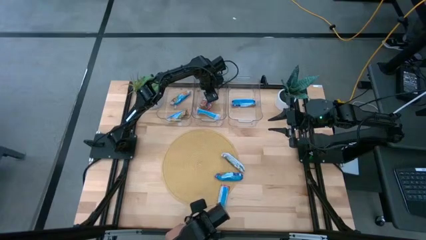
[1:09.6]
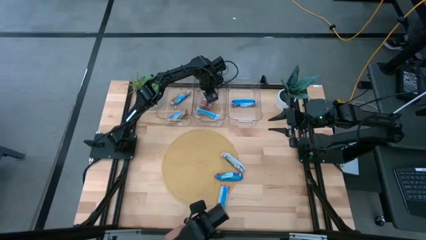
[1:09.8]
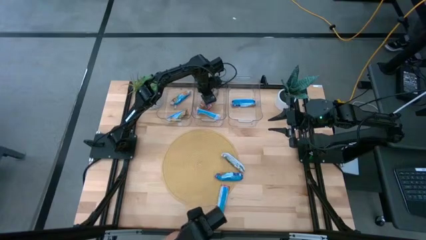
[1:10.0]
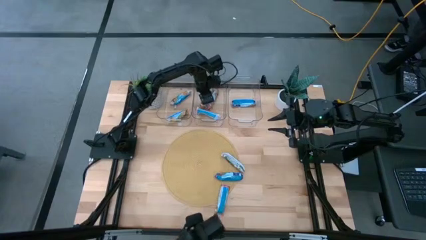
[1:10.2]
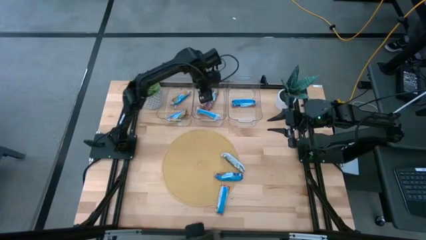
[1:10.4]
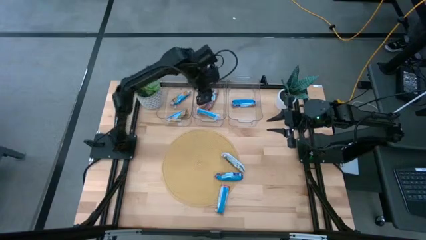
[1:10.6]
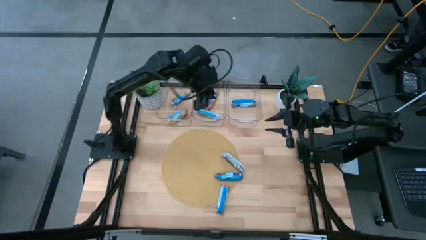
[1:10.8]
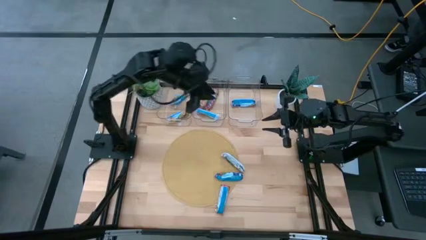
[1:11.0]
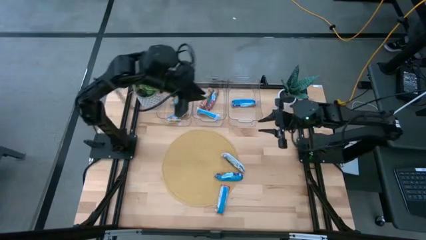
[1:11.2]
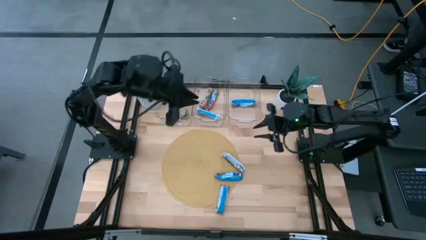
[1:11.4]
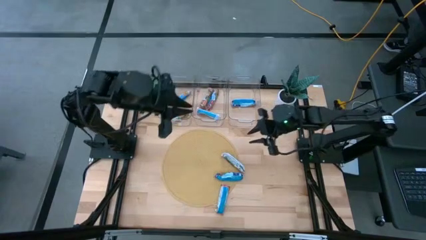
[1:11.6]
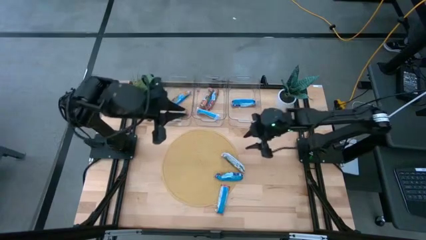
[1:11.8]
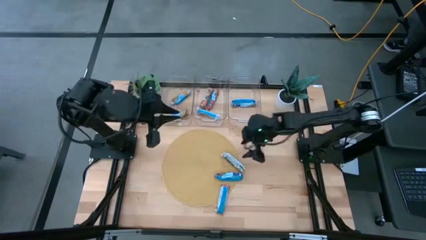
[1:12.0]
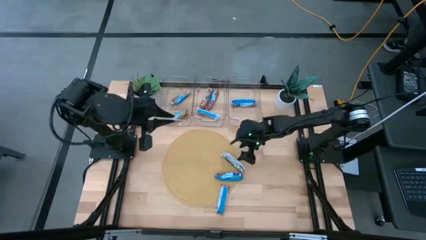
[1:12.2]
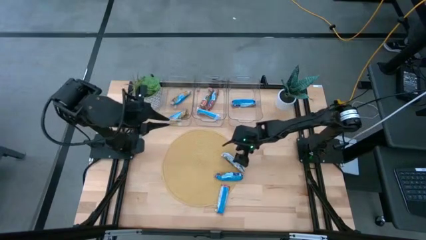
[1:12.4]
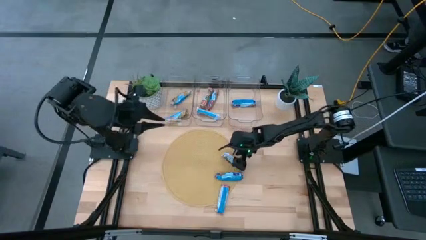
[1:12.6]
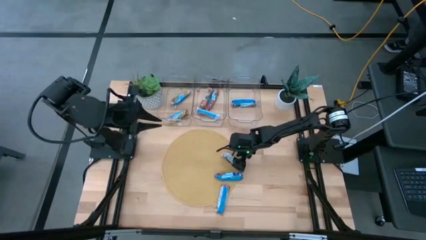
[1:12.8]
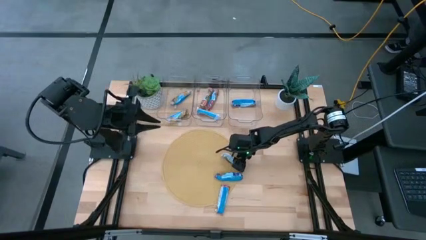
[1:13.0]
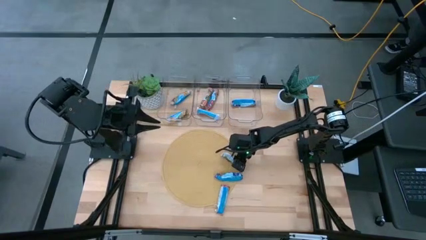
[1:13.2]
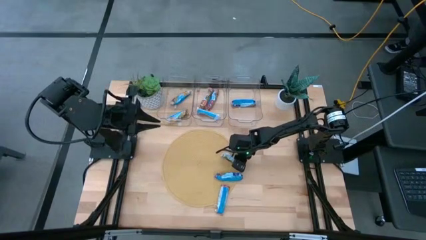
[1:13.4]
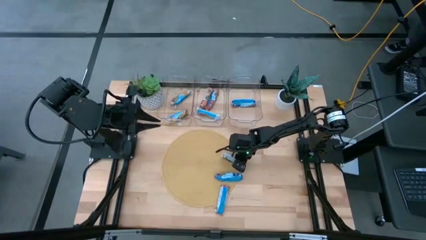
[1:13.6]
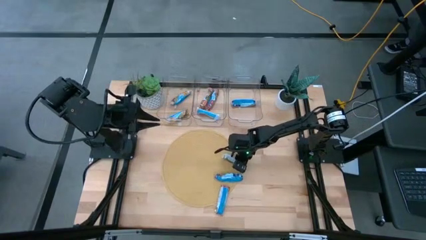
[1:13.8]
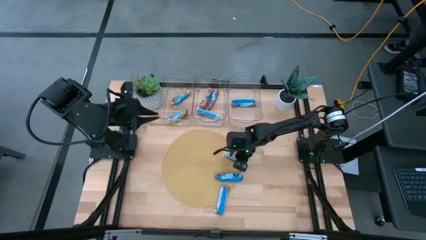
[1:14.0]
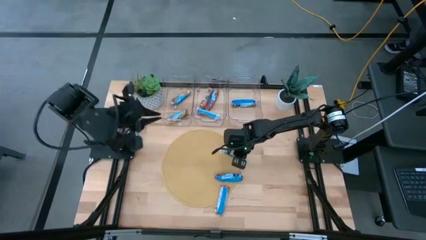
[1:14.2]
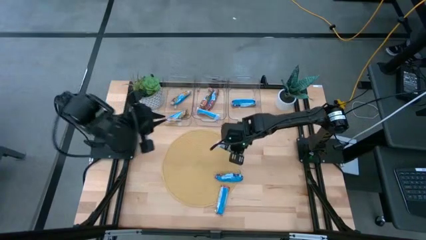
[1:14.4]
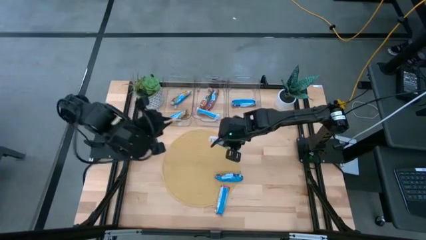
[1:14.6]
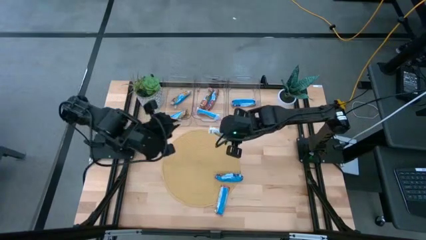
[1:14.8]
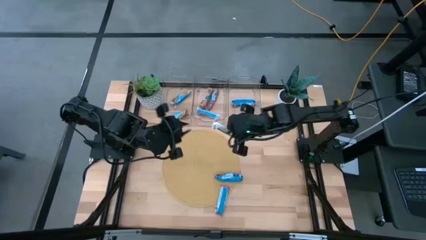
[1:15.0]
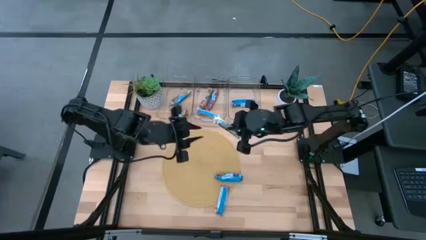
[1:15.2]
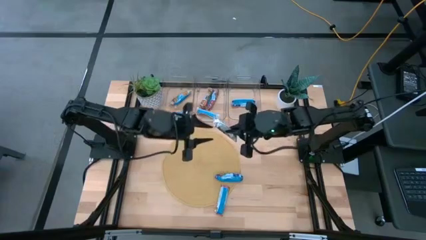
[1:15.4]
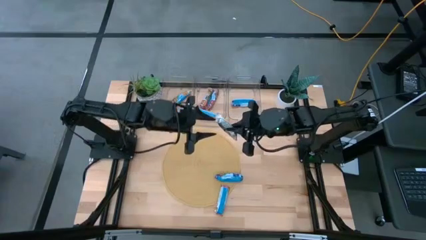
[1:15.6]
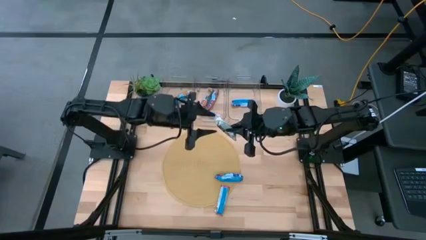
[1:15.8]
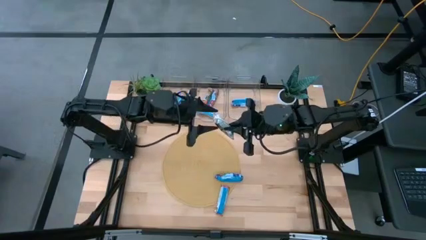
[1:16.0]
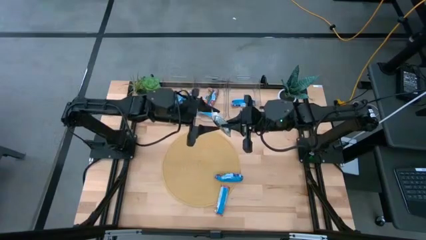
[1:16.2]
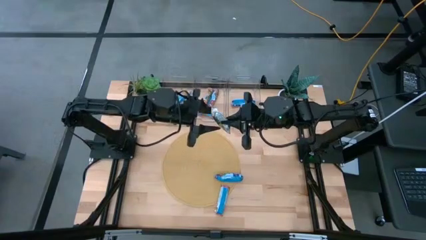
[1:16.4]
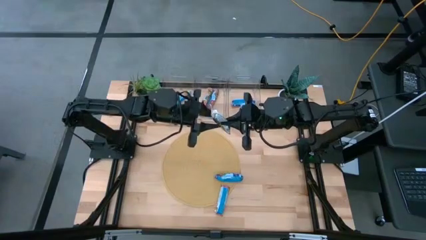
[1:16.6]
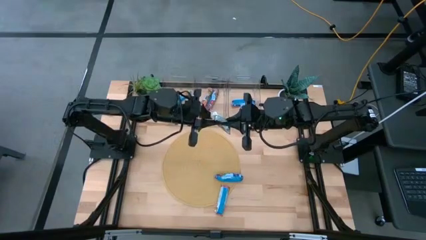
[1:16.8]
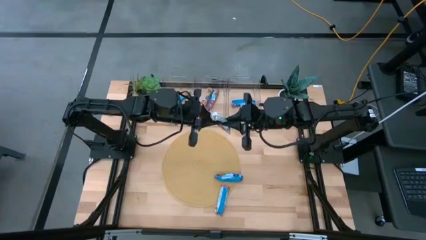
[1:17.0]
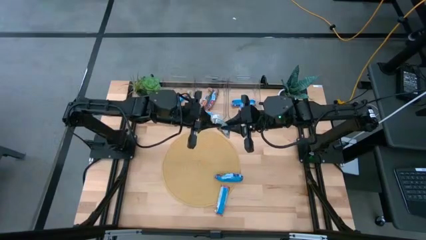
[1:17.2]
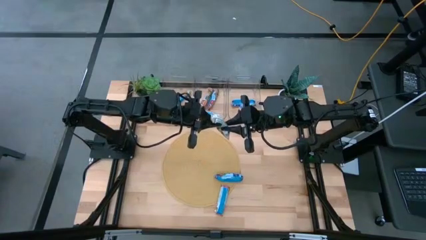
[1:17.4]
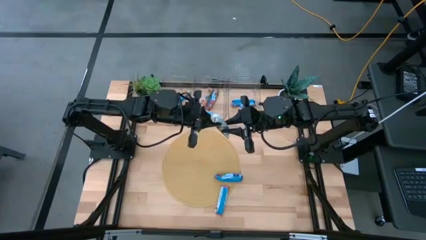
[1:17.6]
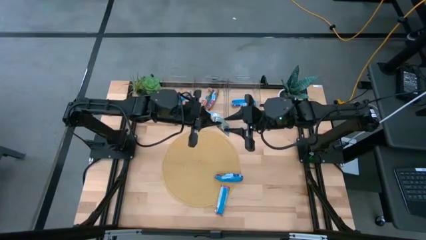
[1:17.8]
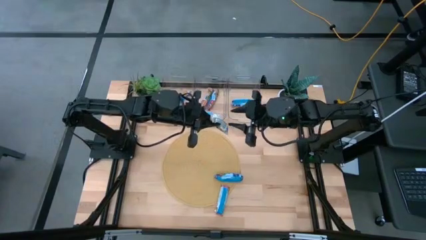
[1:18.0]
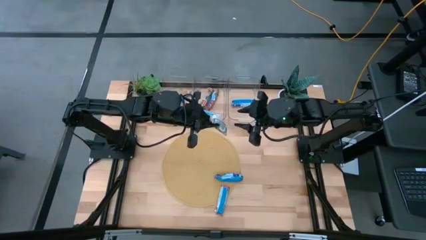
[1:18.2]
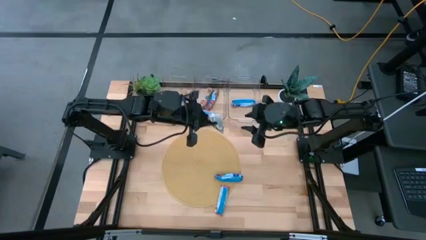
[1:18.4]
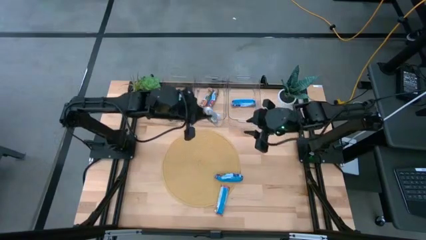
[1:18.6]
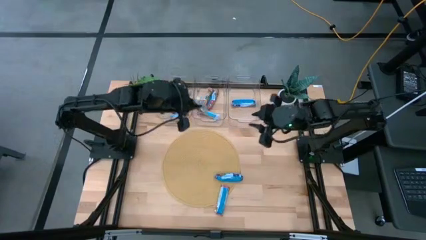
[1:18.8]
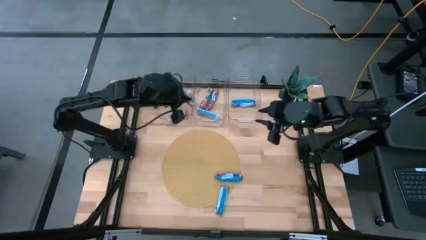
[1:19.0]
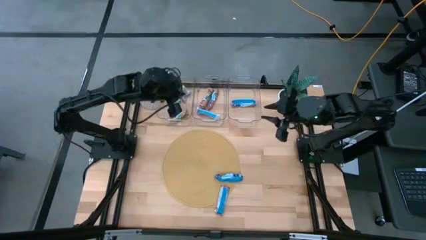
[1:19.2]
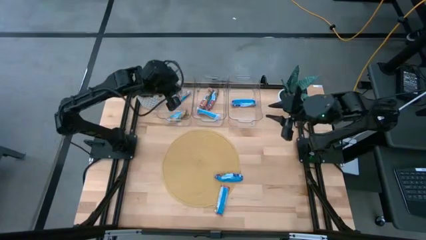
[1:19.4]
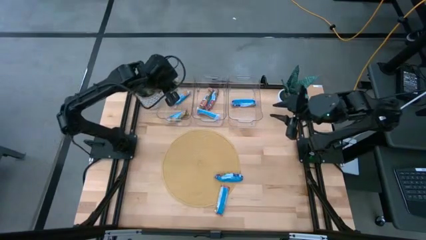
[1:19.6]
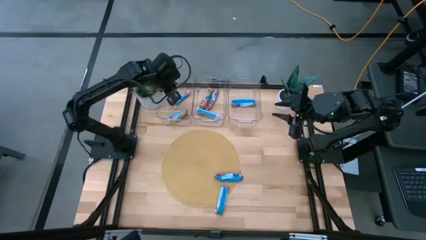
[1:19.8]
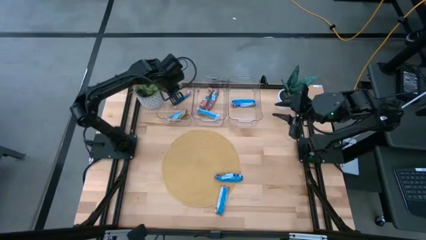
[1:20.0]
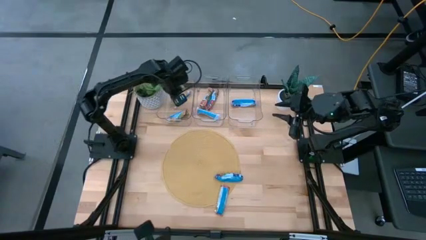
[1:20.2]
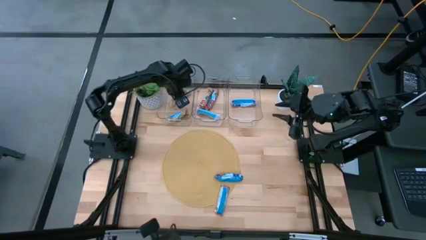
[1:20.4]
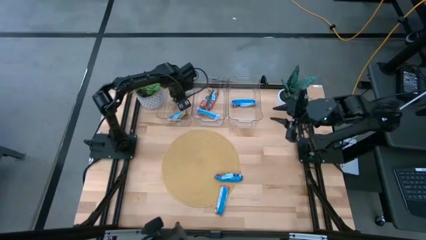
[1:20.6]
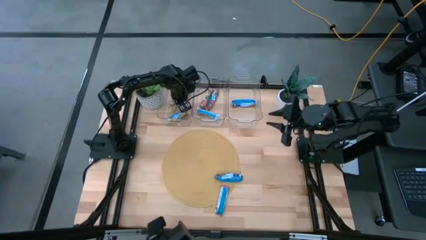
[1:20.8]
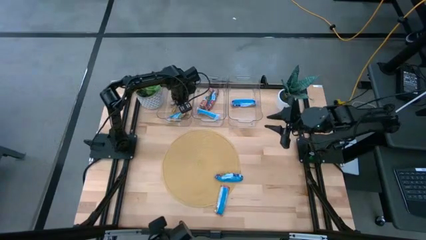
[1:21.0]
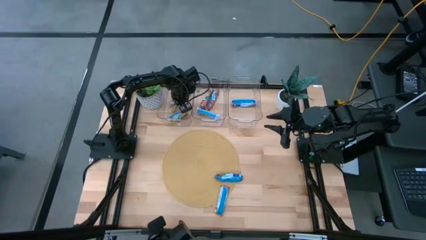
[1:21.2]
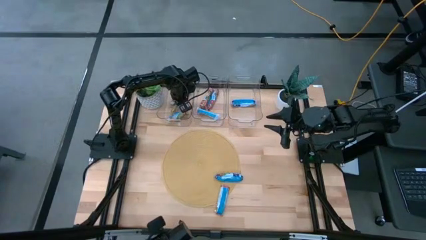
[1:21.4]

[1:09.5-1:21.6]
Task: Pick and place Granola Bars by type
Put the yellow granola bar into the left transparent bin

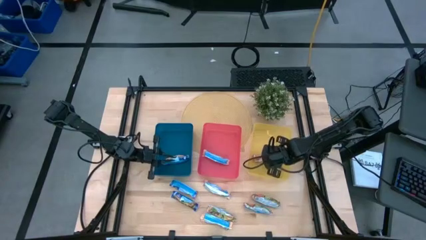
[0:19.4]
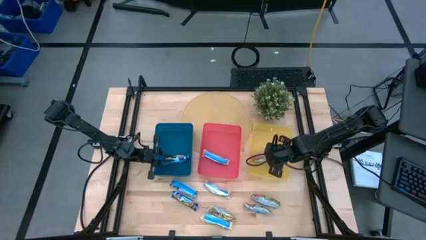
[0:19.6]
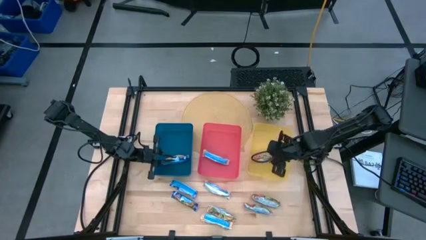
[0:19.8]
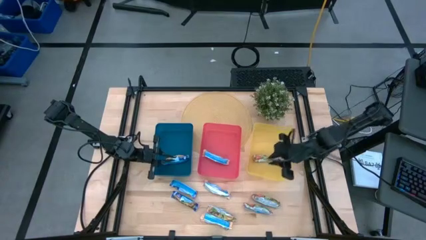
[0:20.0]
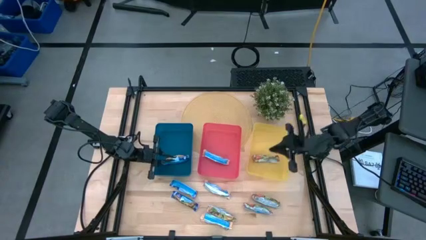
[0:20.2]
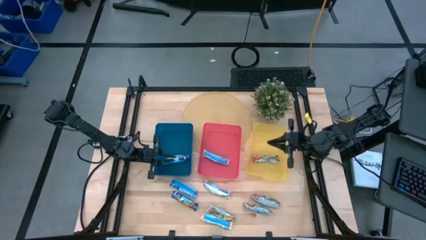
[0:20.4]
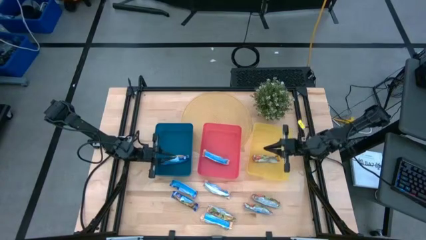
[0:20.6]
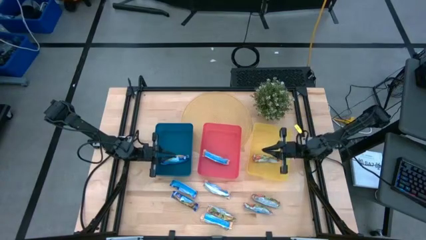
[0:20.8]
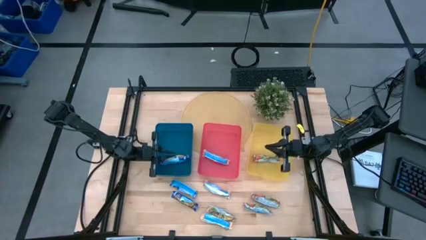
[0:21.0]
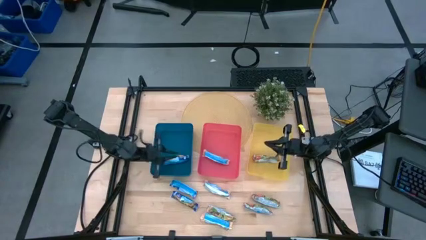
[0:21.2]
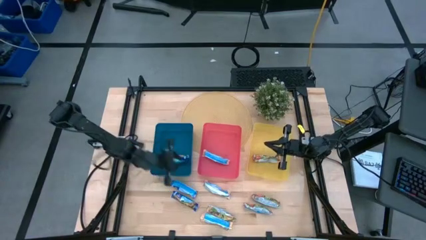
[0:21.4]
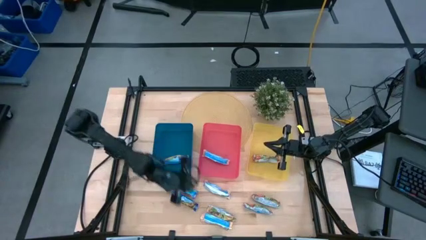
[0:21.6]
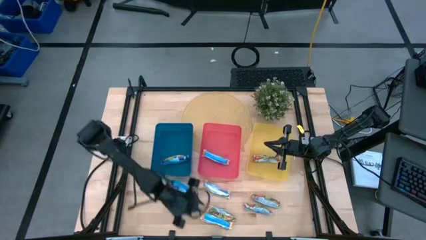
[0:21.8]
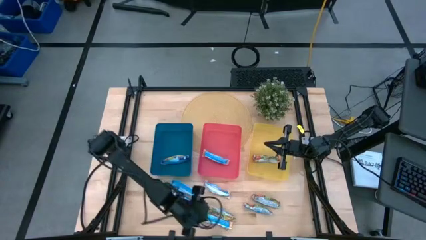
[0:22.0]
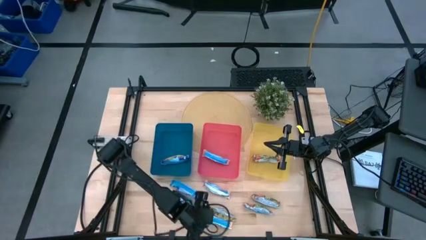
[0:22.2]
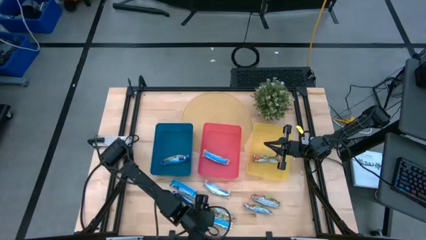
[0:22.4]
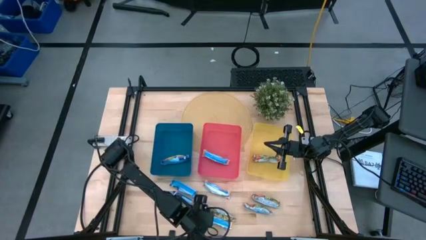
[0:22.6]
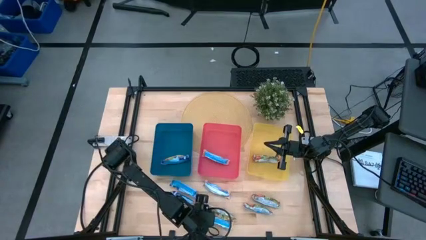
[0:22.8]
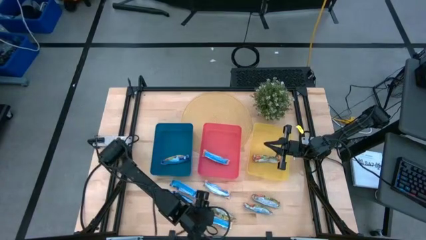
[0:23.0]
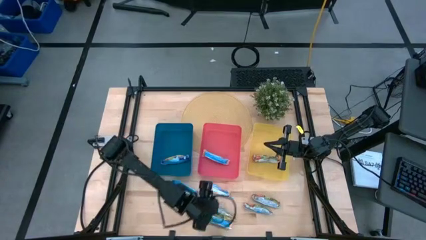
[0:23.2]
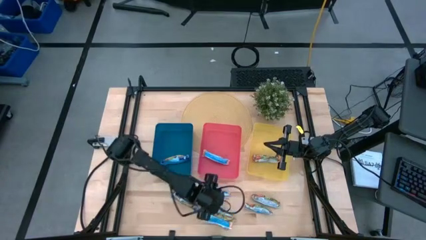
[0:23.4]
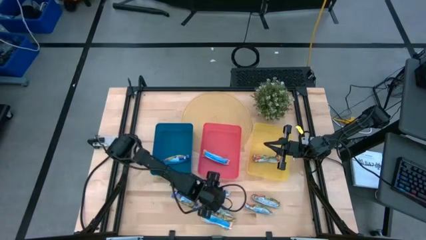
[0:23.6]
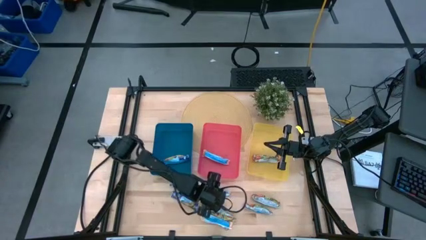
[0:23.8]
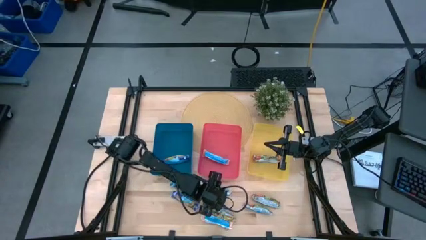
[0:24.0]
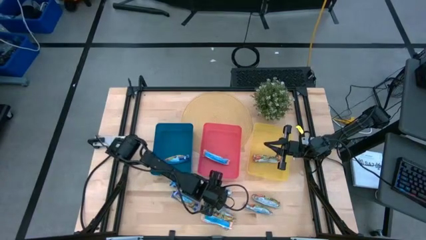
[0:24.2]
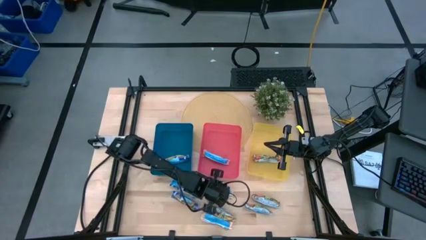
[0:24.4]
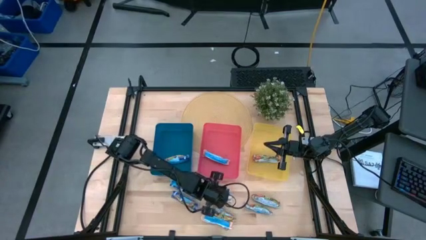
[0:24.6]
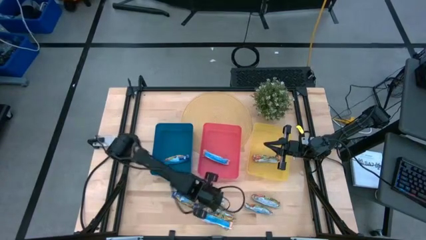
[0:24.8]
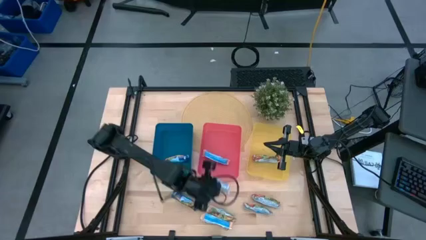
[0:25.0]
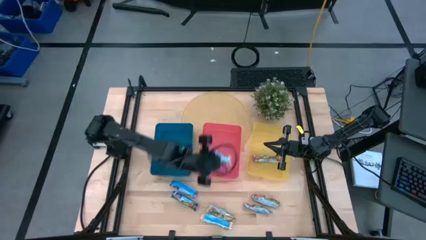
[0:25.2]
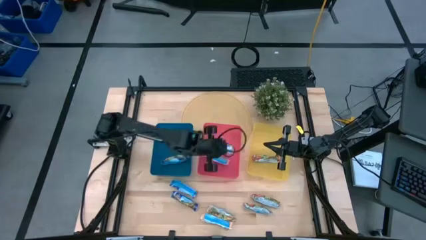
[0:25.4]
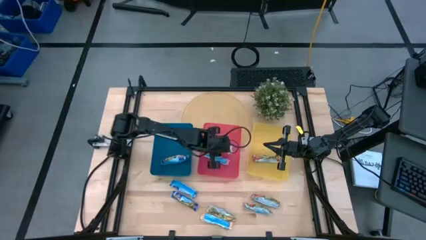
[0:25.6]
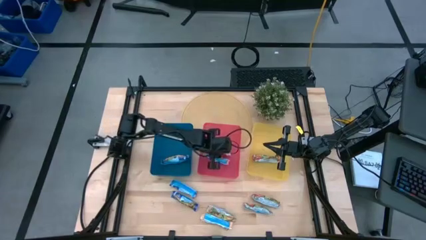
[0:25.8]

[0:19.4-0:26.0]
Task: Pick and place Granola Bars by type
Put the orange granola bar into the red bin
